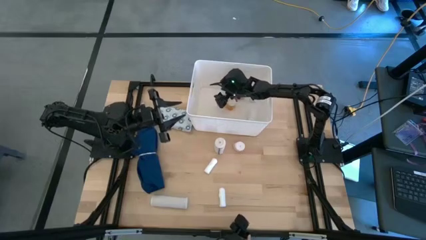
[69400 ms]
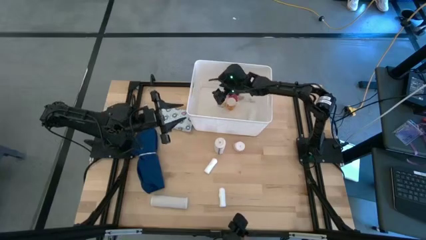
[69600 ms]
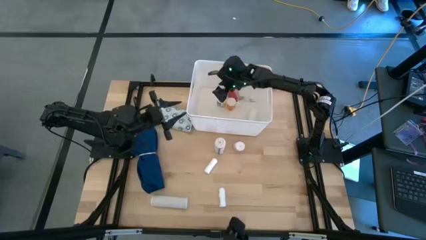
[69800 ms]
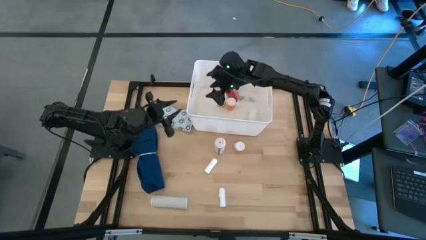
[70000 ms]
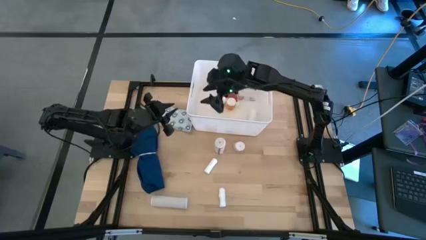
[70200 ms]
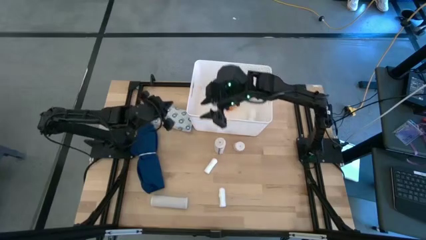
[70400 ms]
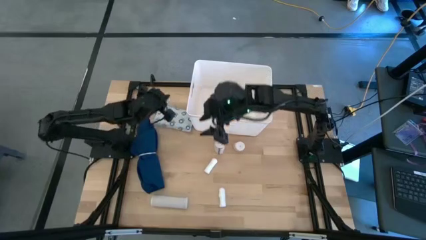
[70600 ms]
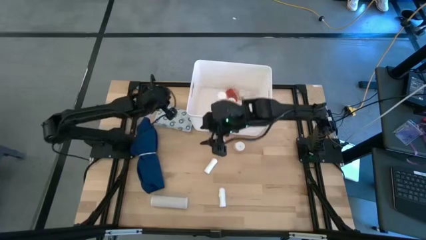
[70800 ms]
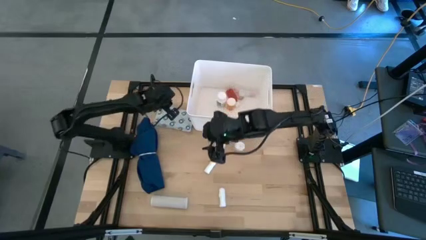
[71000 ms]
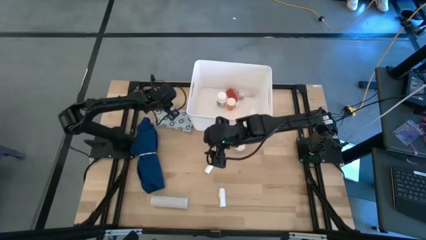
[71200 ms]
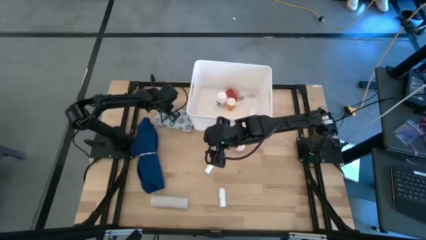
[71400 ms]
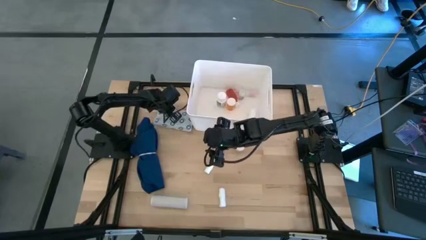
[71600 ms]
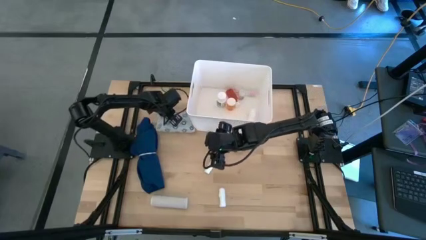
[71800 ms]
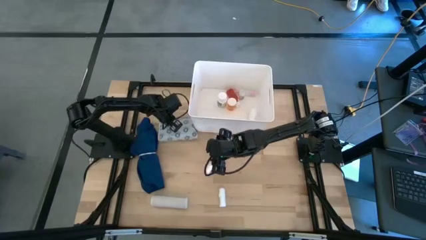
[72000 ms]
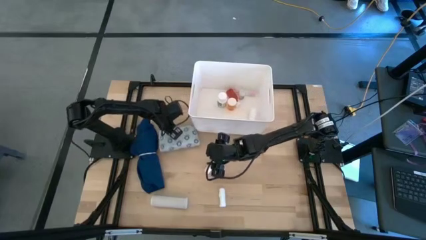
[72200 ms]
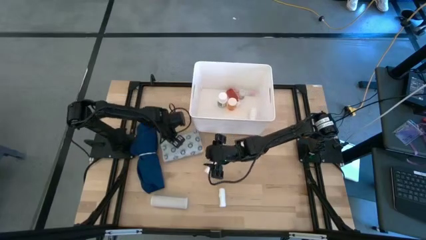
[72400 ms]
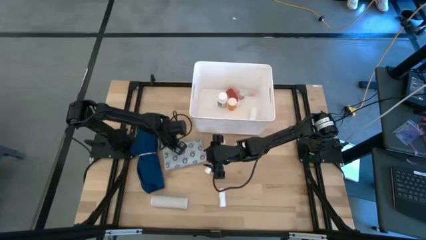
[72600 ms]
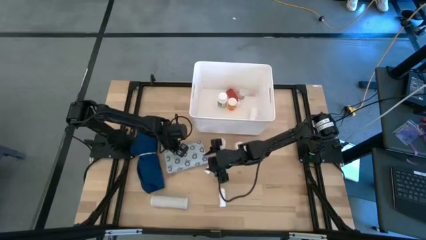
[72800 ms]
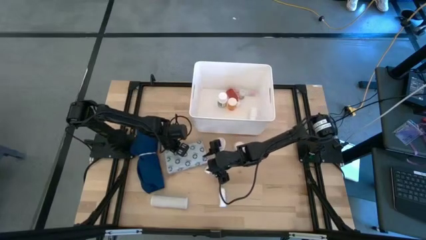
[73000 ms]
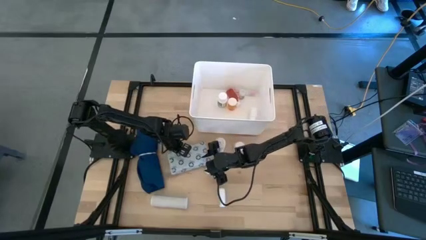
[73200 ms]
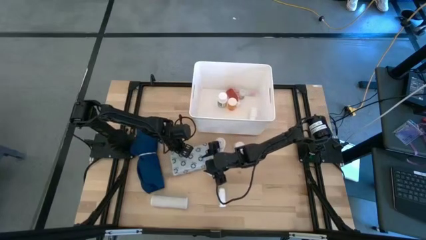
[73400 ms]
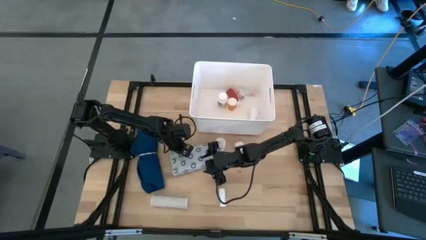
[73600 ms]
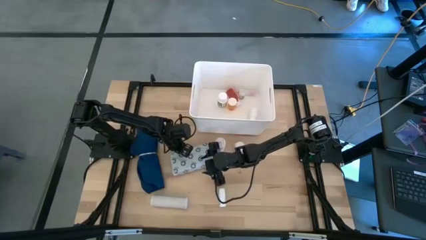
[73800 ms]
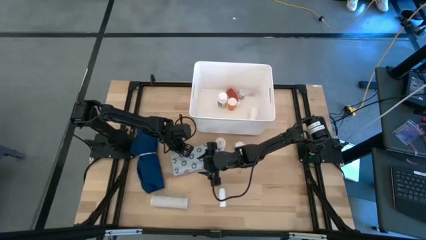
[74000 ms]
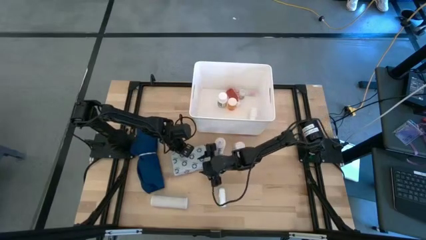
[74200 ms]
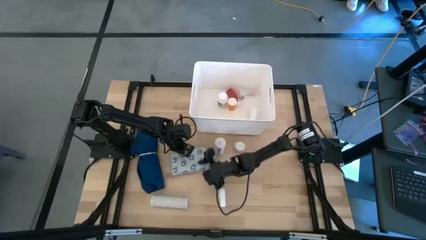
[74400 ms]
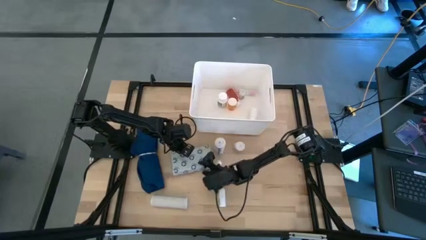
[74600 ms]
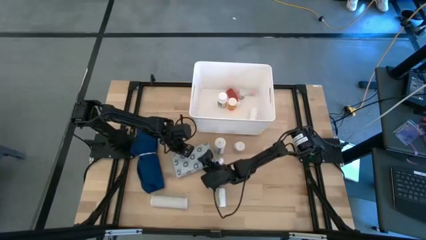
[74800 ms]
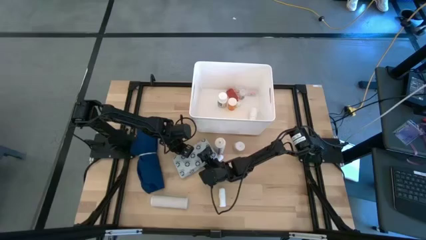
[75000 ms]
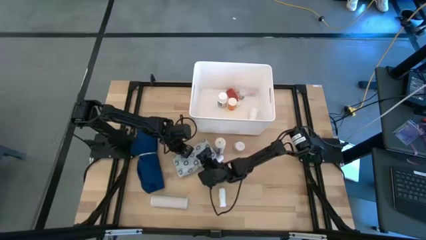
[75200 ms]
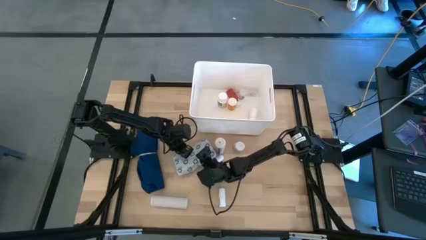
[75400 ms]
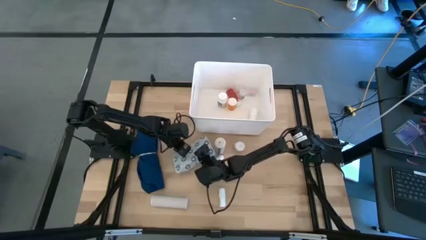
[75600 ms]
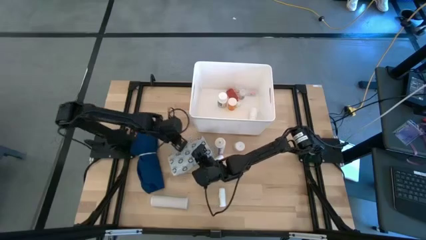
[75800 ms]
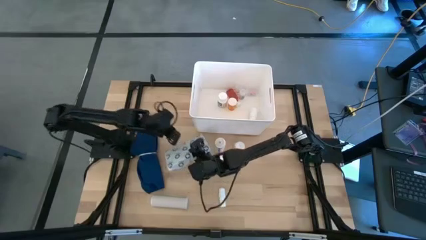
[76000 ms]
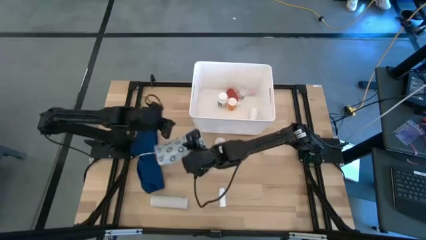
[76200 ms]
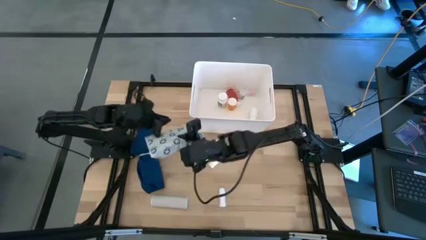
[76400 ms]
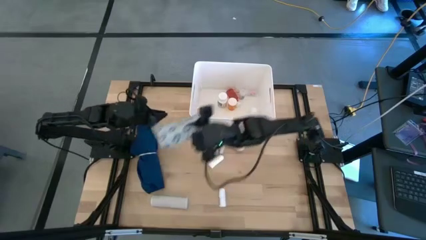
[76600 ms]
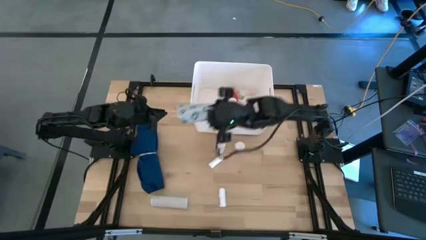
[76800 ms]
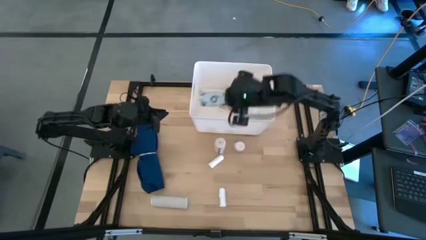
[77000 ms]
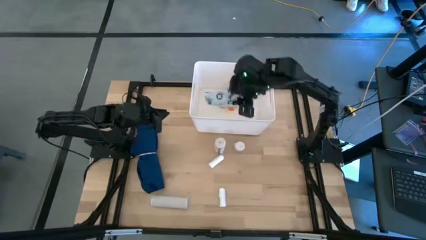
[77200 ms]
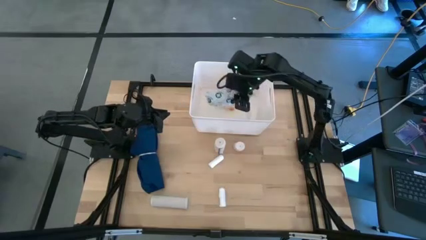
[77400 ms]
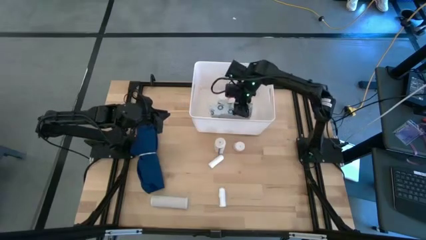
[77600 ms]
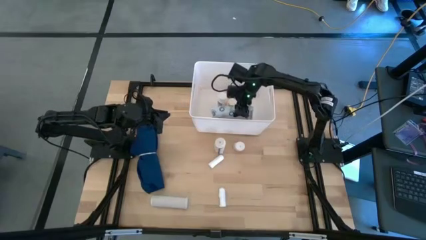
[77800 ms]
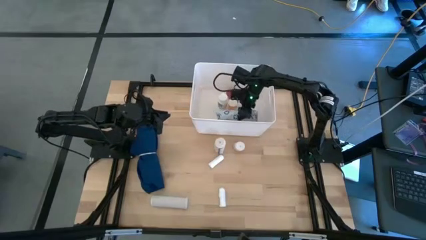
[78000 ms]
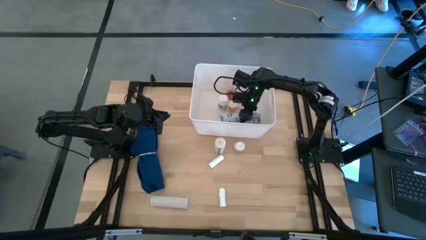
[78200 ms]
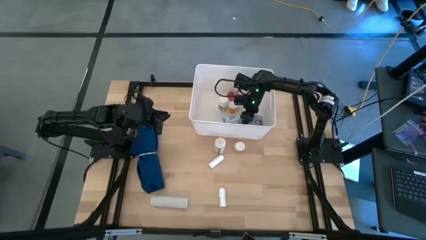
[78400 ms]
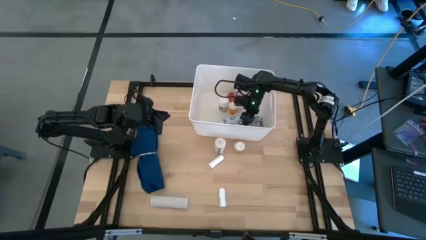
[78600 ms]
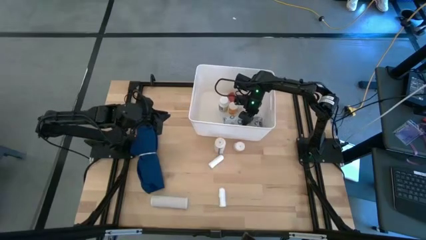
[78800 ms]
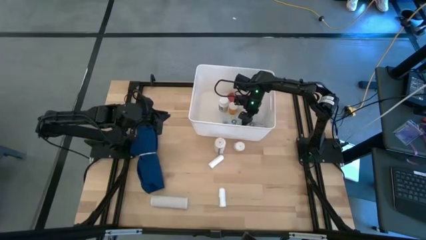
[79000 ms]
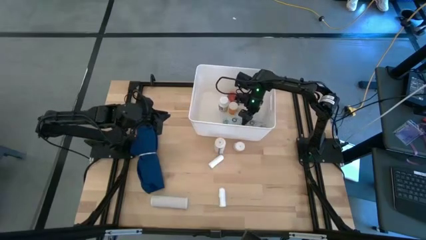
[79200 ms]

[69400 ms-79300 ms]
Task: Pick & place medical supplies in basket/bin
Put the mailer bag in the white bin

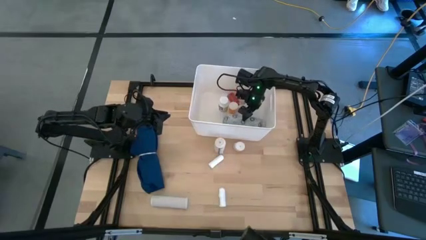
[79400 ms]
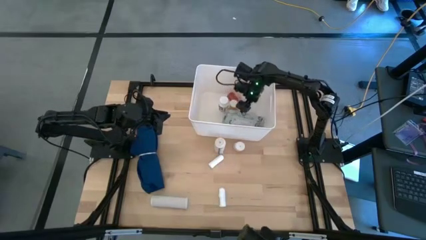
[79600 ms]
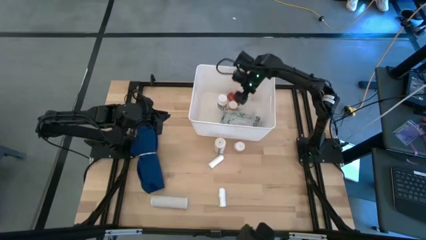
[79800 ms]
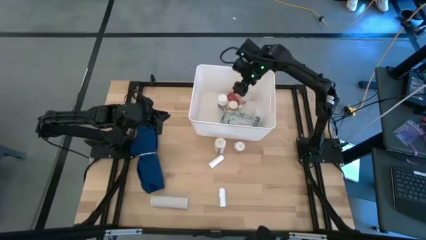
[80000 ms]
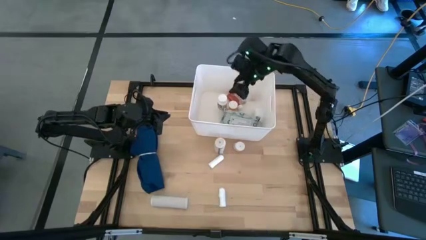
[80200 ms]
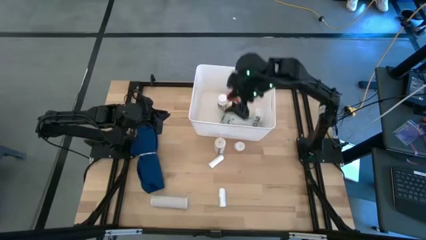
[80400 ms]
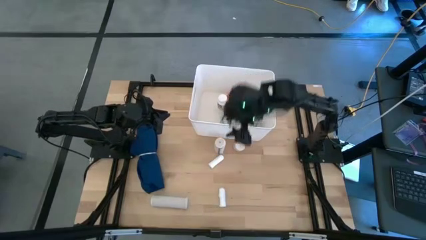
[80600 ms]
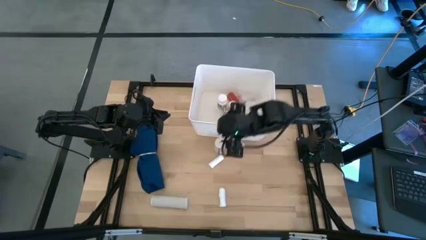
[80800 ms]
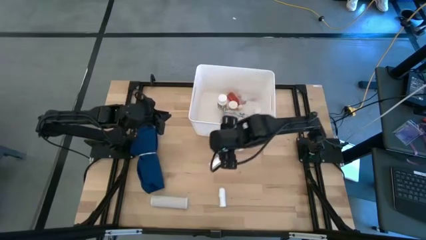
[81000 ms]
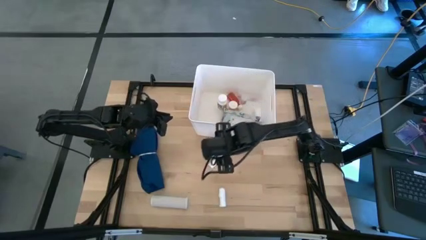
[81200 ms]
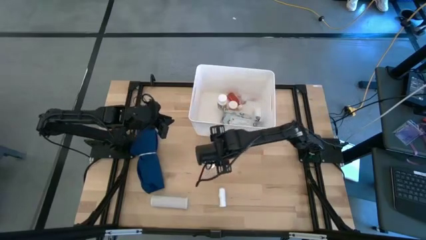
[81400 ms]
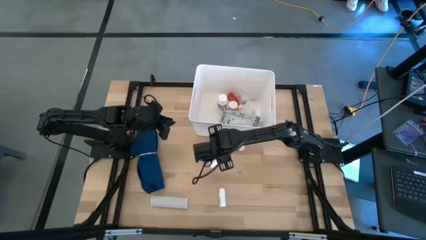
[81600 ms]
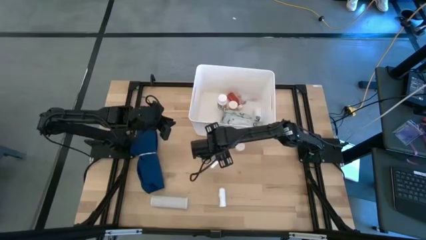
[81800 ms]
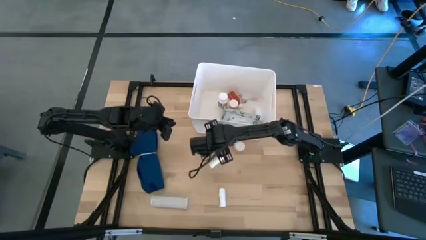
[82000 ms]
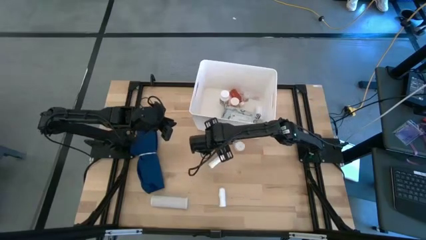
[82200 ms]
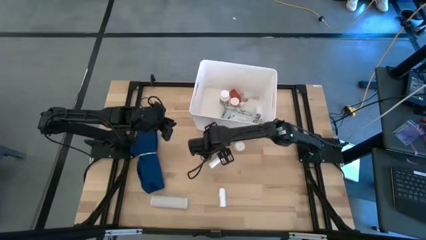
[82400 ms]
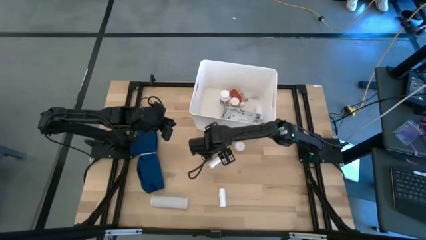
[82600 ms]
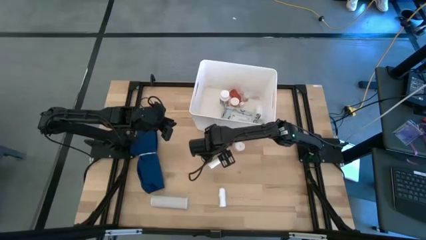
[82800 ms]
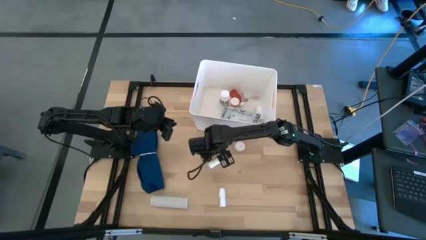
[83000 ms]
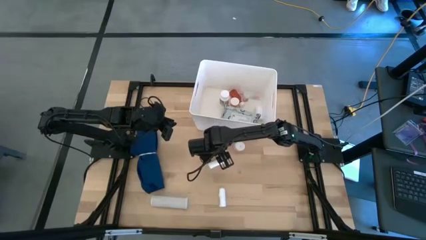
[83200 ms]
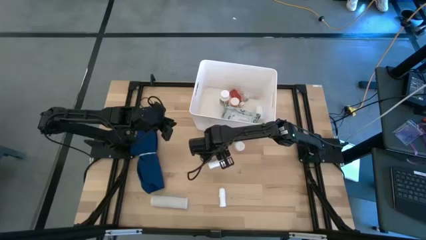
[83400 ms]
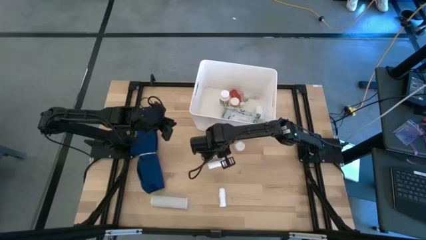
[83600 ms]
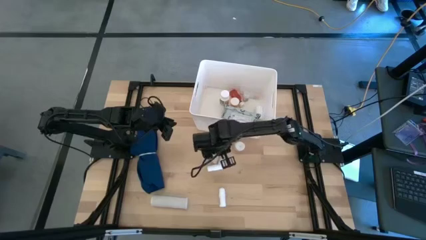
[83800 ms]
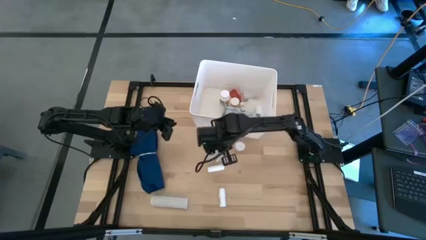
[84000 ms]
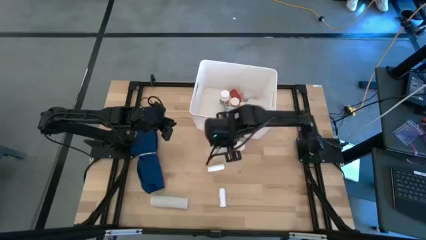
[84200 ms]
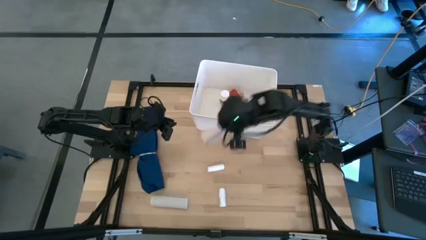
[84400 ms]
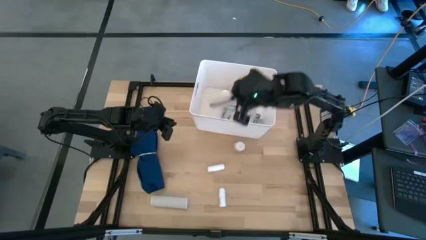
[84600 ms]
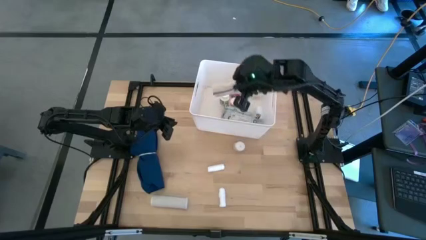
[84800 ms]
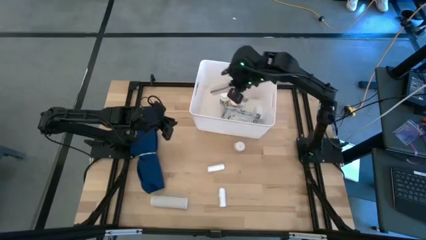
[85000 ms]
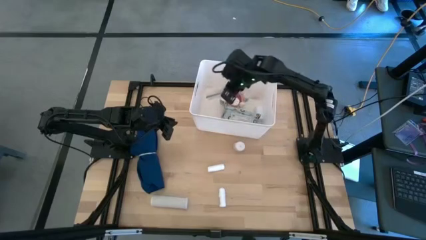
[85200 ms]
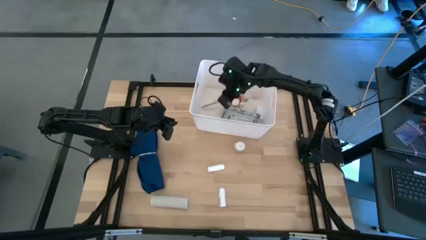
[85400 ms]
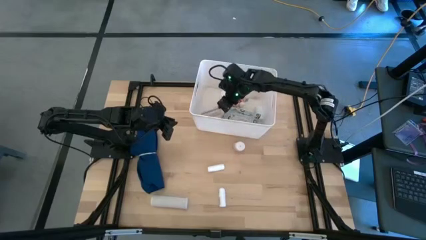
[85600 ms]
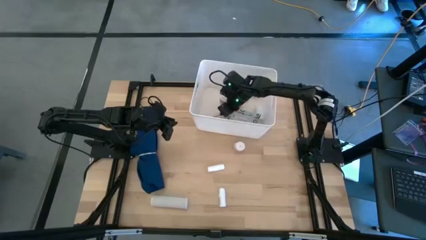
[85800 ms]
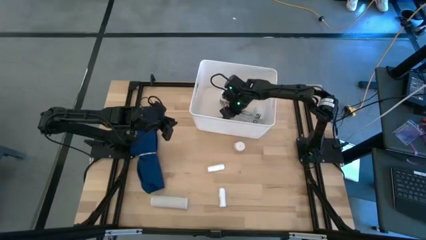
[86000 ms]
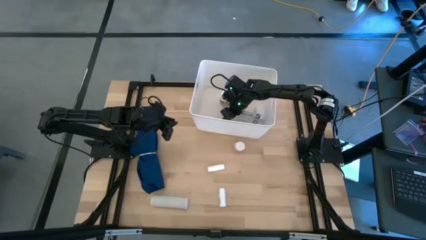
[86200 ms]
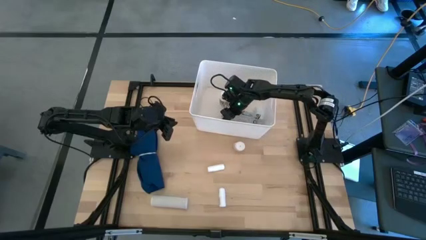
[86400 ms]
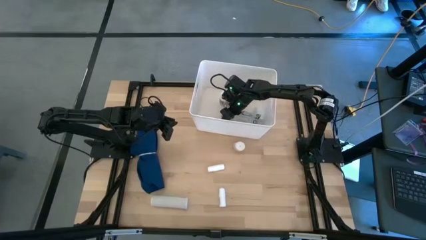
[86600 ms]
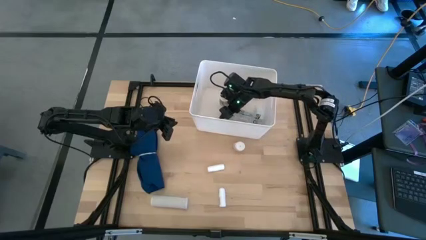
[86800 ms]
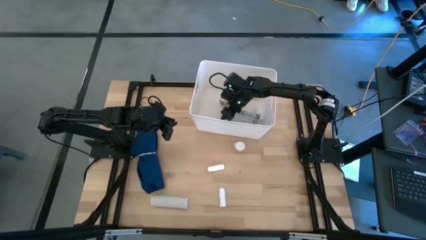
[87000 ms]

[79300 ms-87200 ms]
Put the top left bandage in the white bin
